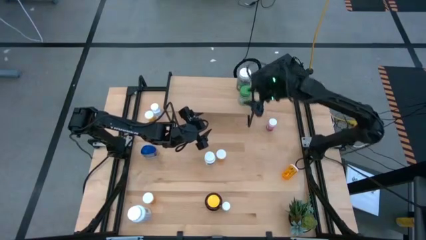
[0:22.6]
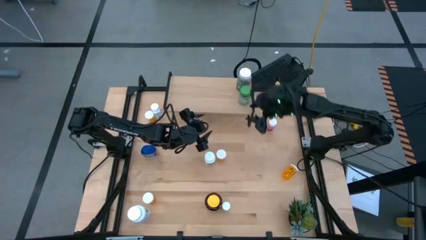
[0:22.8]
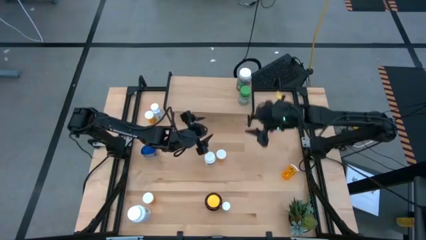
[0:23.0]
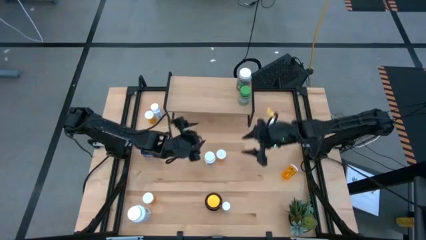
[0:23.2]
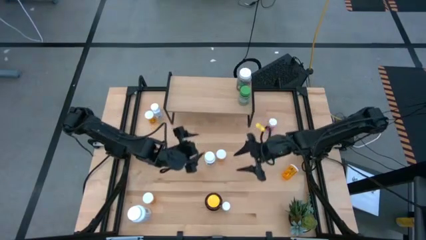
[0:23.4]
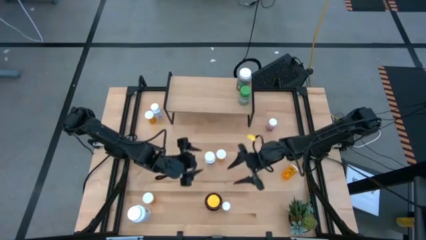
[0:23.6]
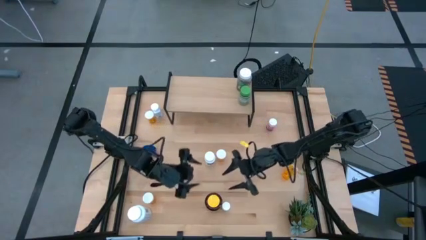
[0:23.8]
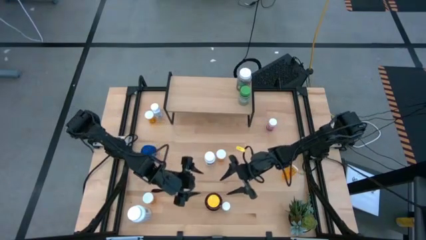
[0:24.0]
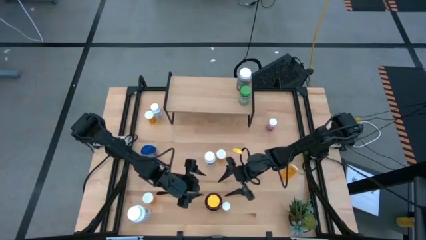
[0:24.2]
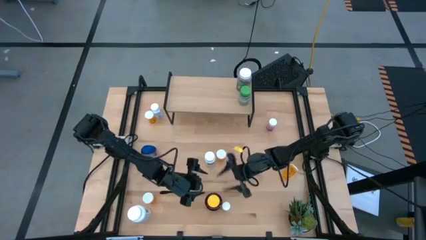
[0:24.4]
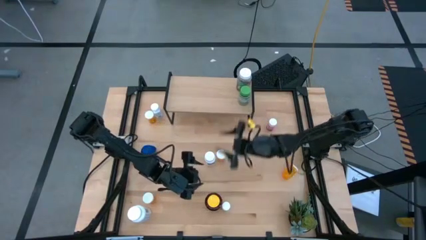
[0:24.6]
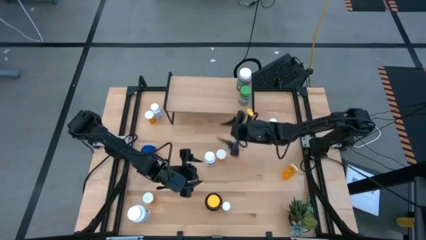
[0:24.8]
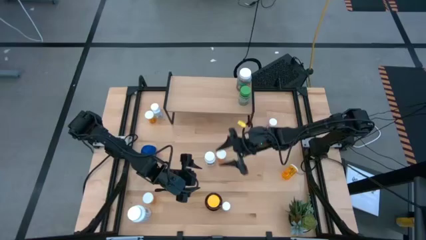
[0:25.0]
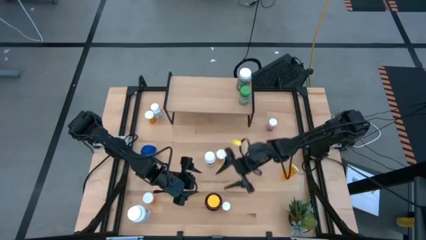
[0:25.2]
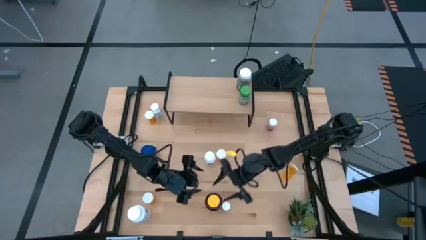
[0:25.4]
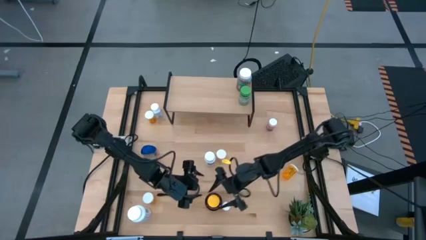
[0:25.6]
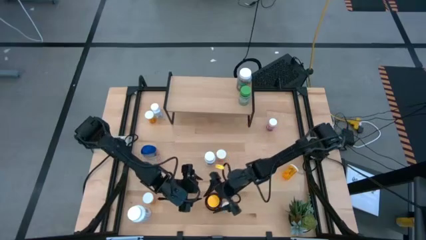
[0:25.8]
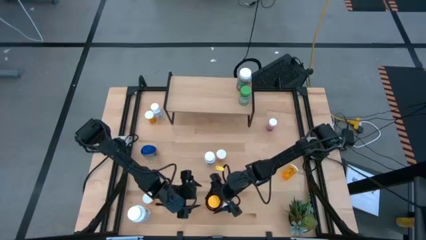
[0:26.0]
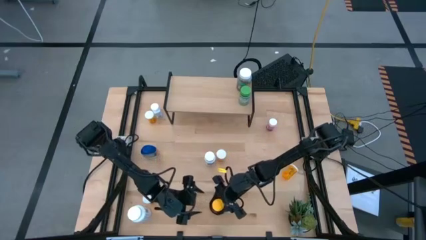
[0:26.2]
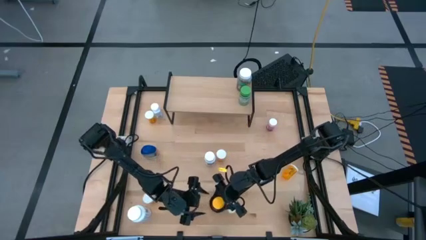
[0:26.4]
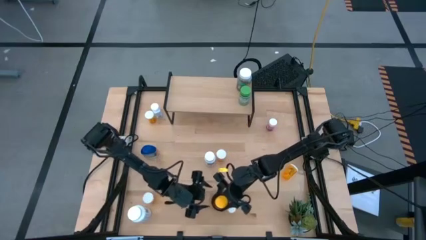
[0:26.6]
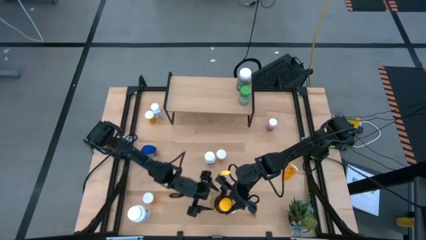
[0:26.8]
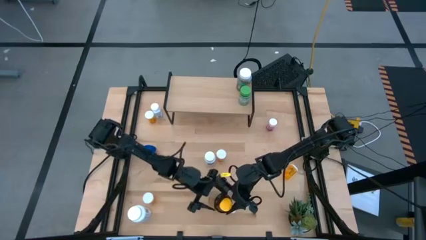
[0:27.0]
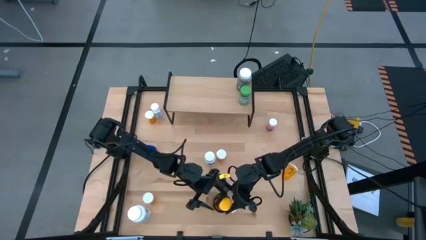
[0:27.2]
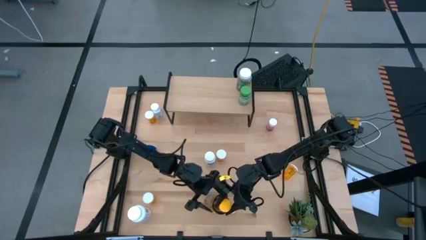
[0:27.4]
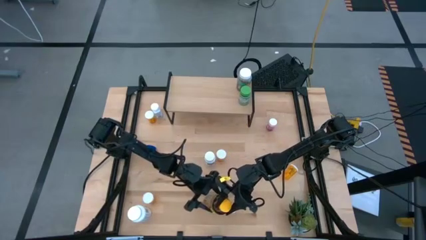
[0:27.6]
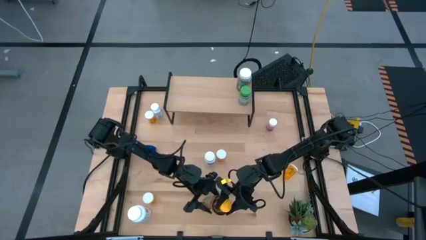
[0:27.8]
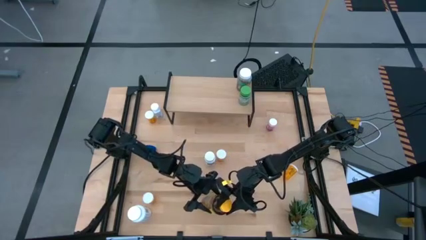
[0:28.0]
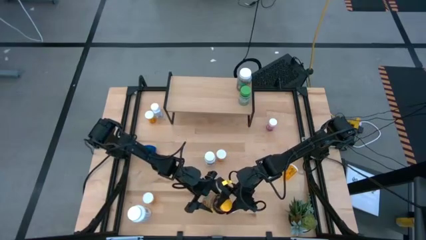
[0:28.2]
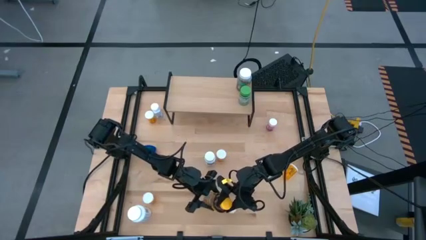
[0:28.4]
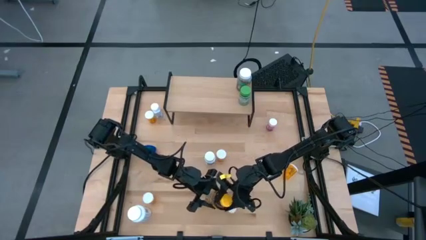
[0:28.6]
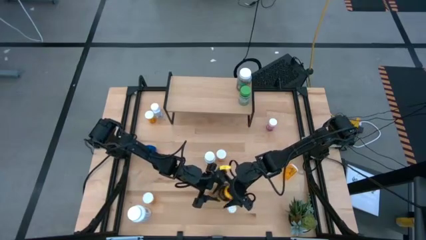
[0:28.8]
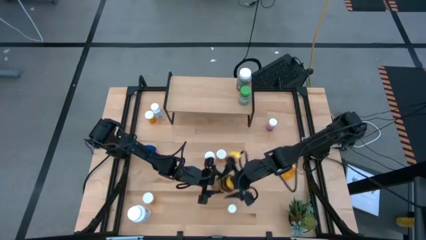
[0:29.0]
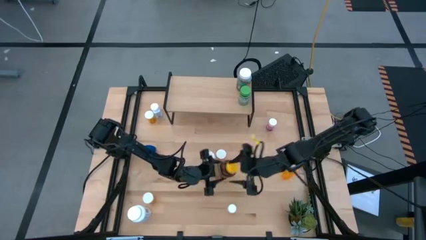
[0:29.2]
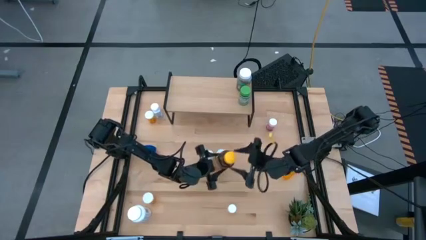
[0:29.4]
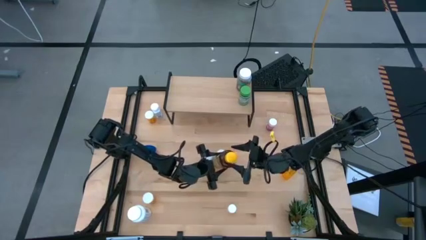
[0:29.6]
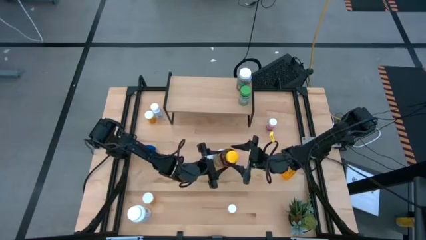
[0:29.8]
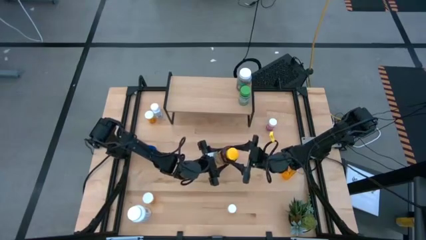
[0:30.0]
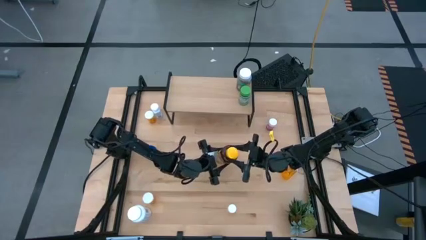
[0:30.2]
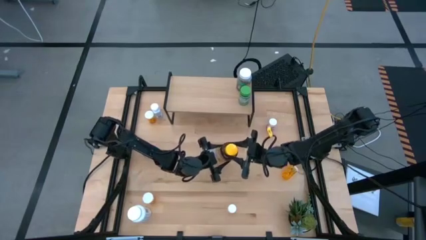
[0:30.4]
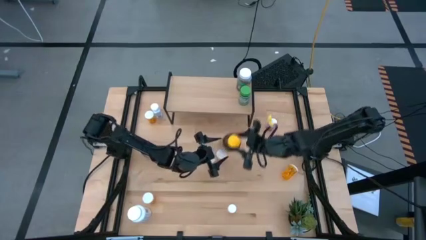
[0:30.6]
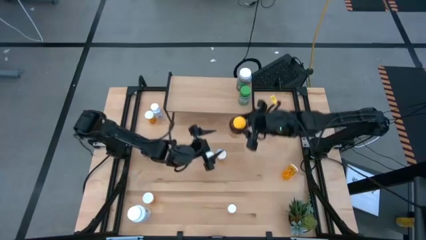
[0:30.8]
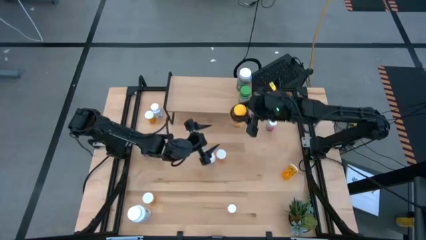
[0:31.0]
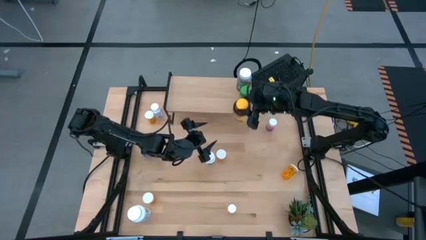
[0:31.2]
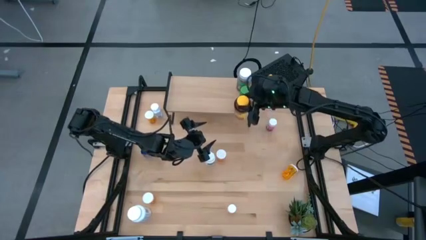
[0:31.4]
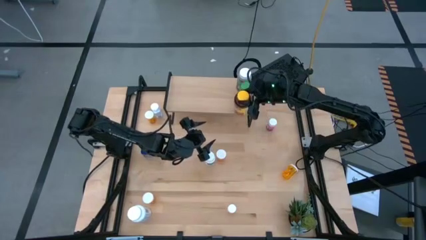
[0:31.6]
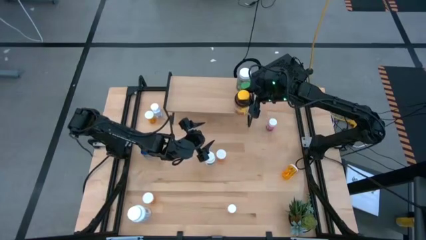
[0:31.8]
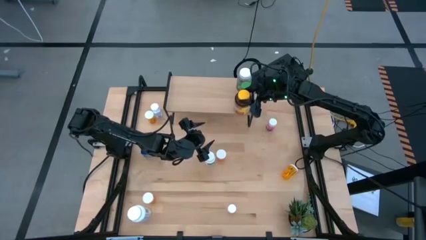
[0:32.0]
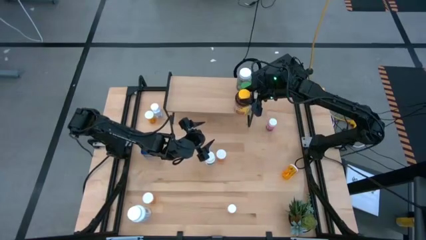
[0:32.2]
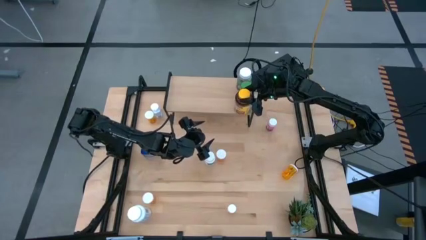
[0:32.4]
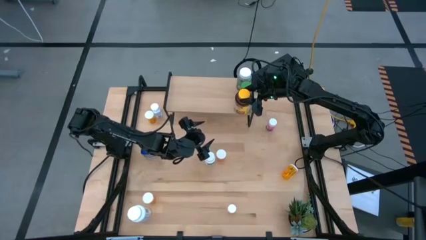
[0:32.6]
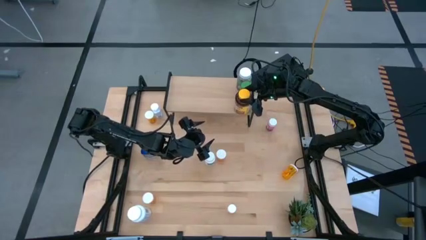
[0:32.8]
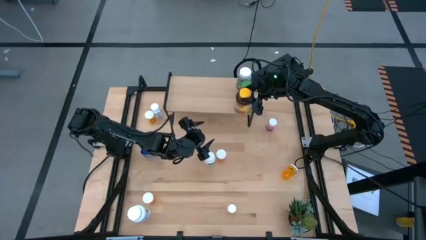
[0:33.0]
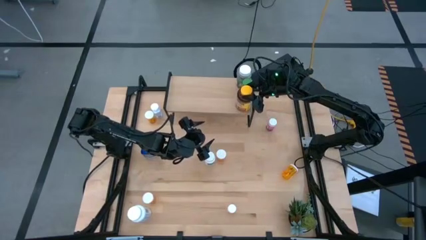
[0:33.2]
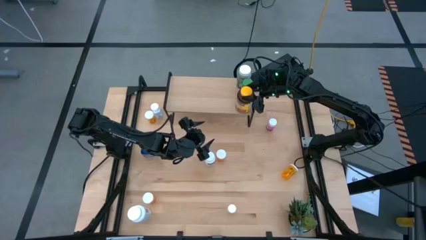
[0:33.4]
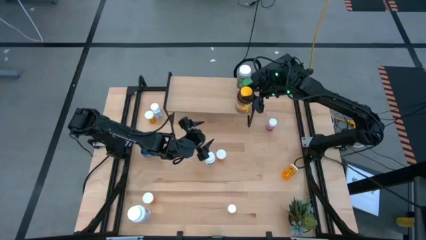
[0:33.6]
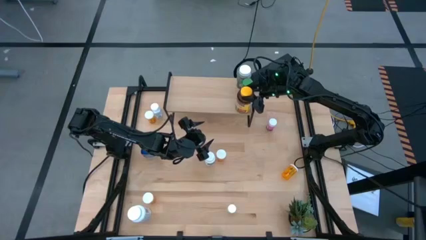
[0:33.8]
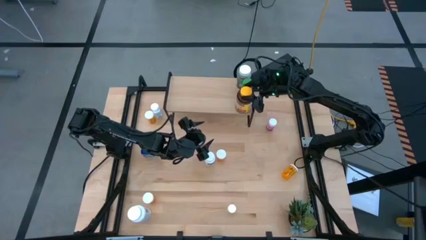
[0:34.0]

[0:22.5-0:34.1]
Task: Pick and place medicine bottles onto shelf by color
Put the yellow pill bottle on the shelf

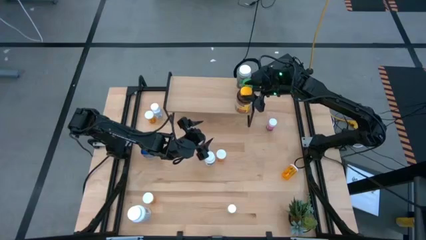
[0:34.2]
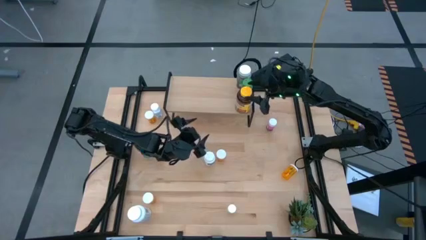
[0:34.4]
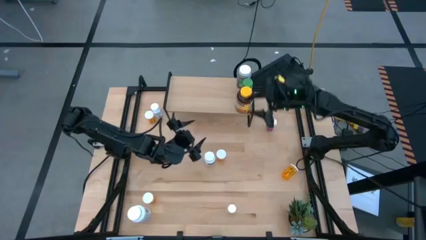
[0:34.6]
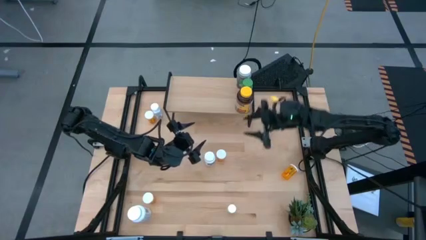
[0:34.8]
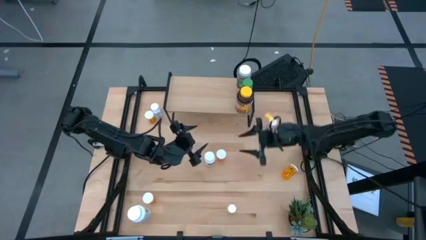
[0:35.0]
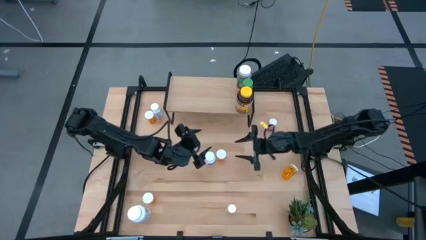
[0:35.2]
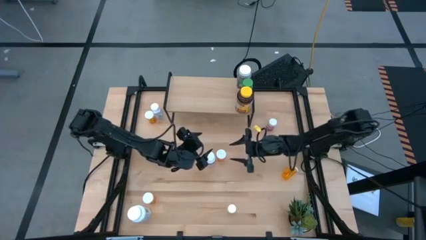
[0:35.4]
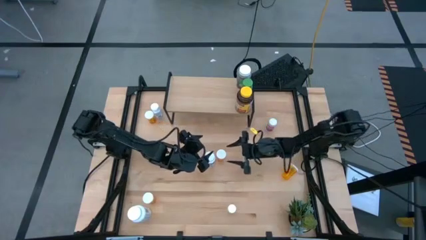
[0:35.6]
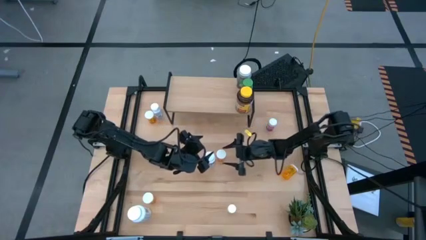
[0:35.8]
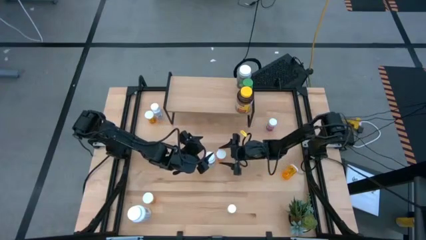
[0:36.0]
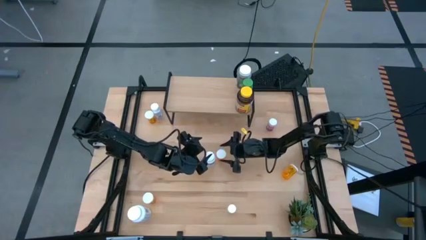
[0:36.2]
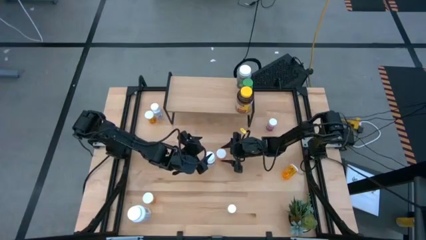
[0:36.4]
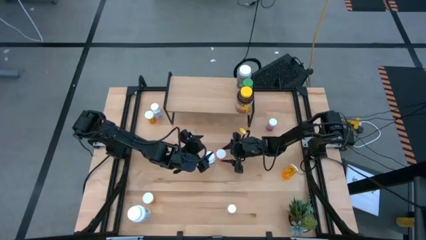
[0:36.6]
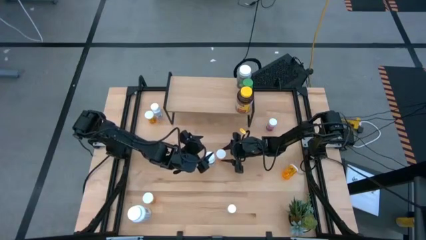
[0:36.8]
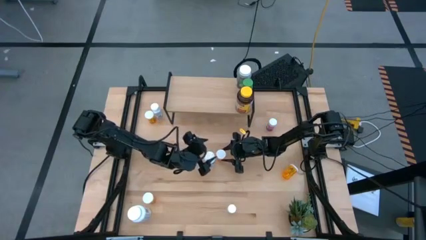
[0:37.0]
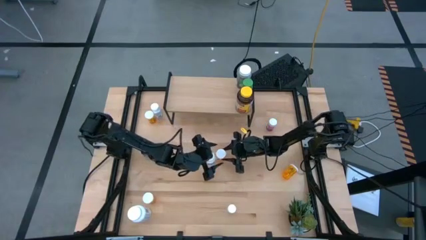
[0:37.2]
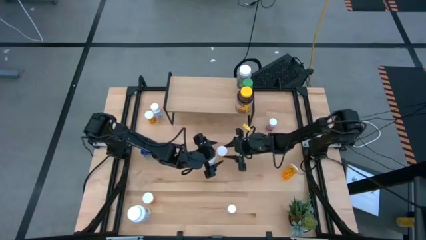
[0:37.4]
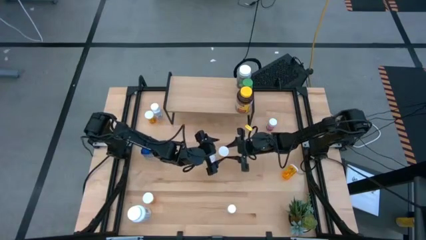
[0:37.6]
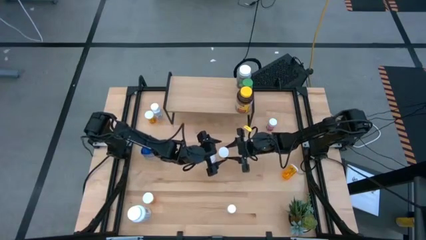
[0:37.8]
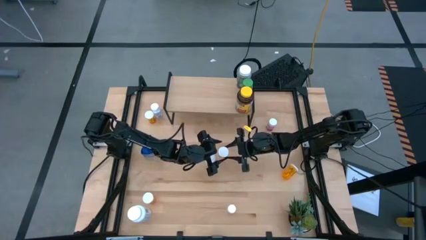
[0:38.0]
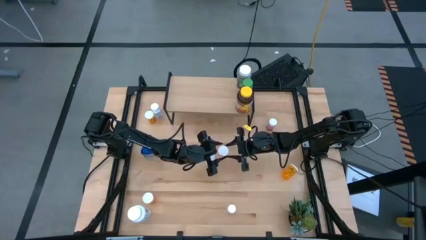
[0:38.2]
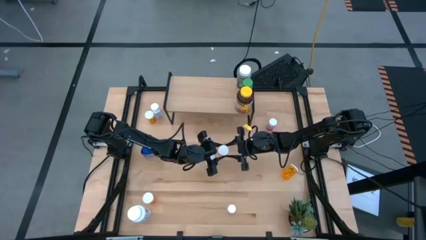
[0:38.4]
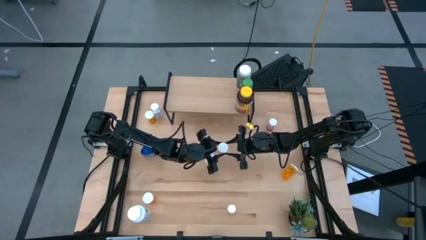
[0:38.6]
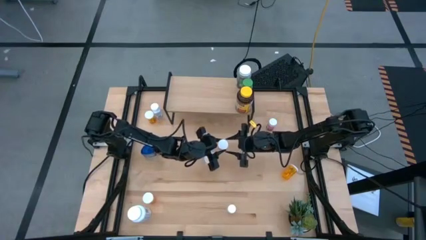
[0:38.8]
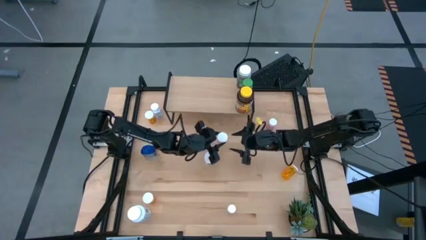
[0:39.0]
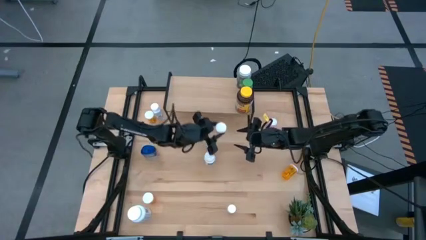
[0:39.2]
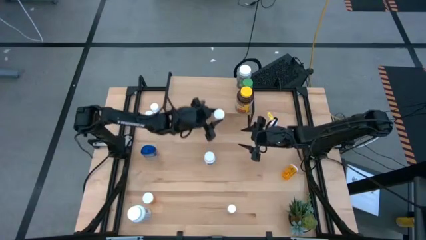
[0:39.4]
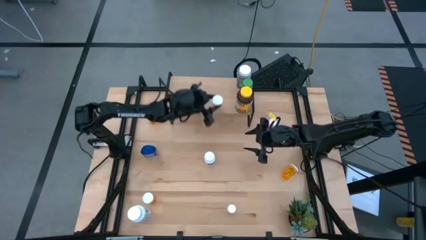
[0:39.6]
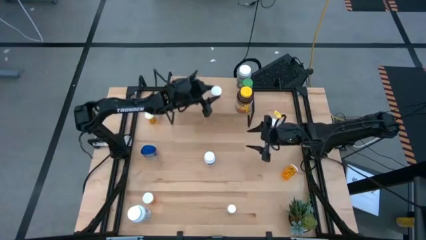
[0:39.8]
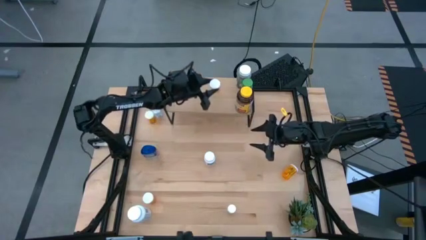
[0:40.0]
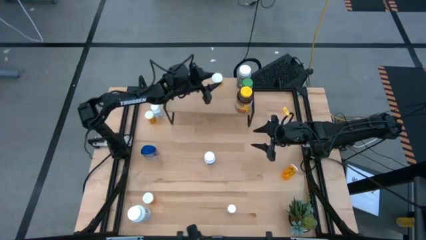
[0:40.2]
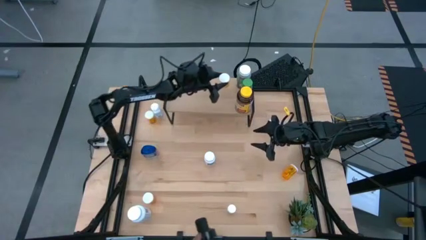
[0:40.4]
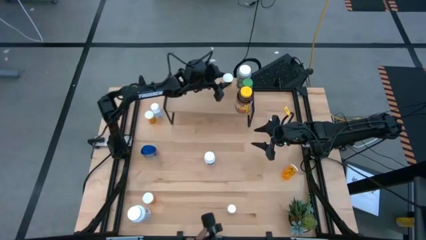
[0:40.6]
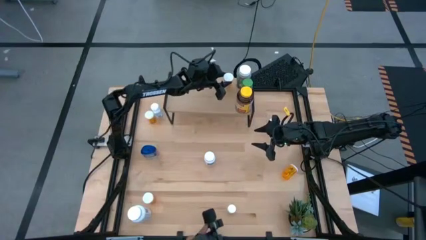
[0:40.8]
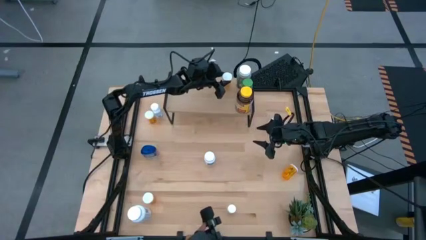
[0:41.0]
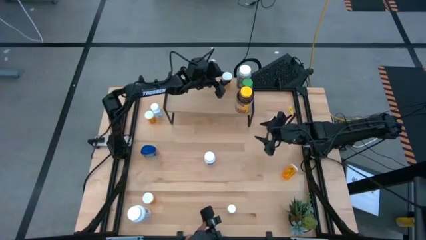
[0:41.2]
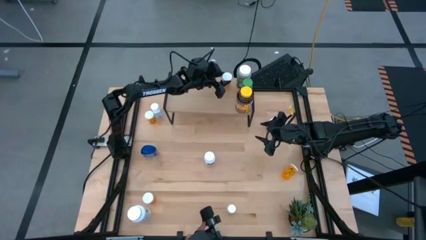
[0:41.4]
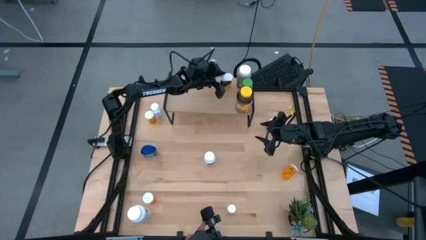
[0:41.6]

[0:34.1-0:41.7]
Put the orange pill bottle on the shelf
